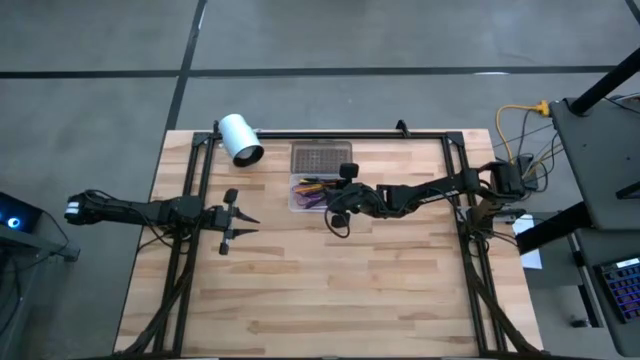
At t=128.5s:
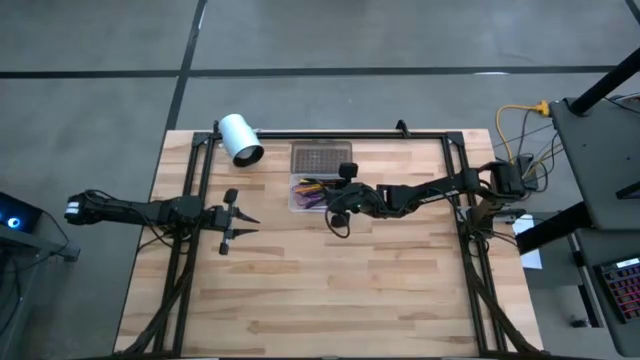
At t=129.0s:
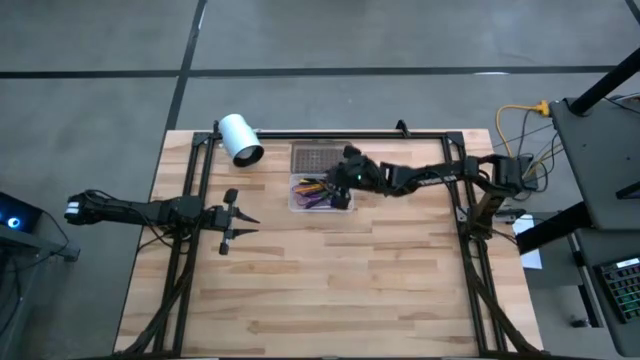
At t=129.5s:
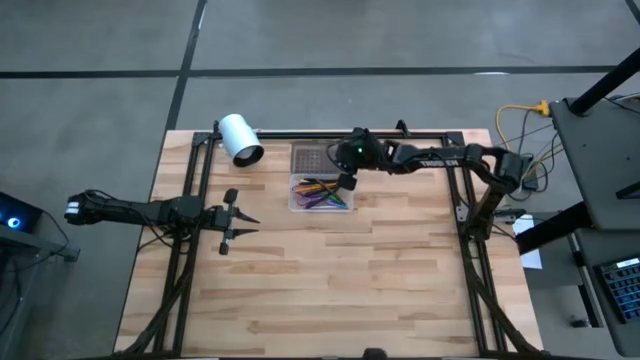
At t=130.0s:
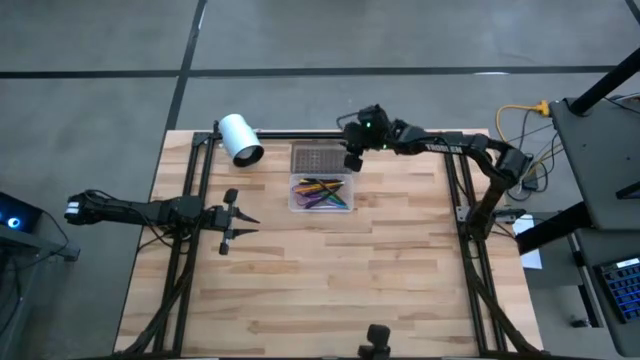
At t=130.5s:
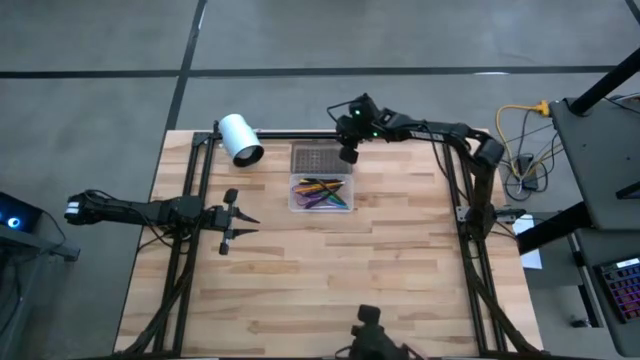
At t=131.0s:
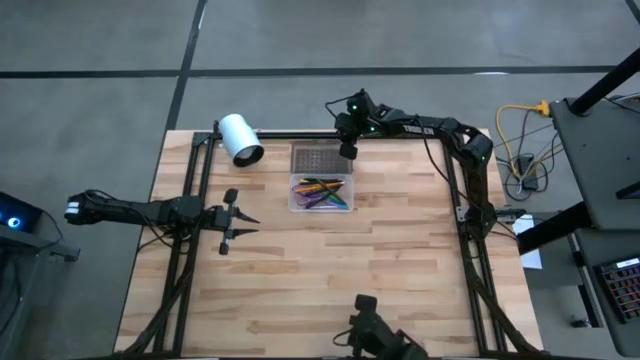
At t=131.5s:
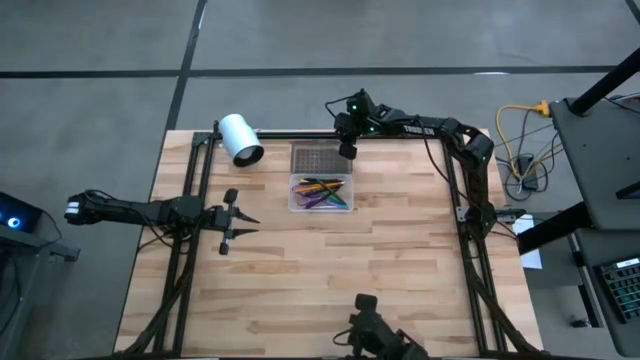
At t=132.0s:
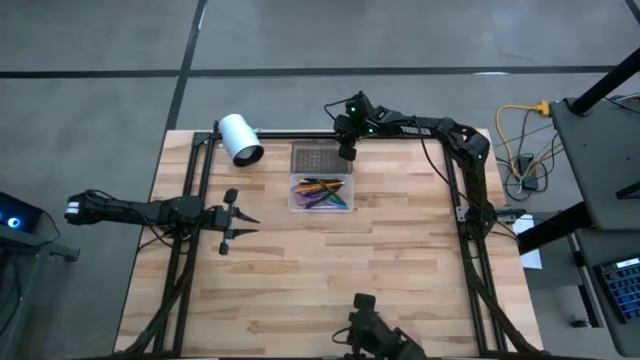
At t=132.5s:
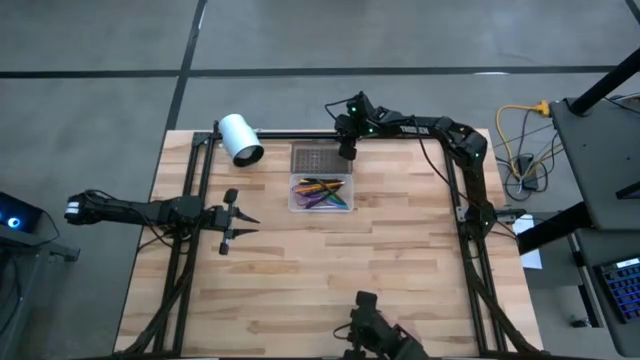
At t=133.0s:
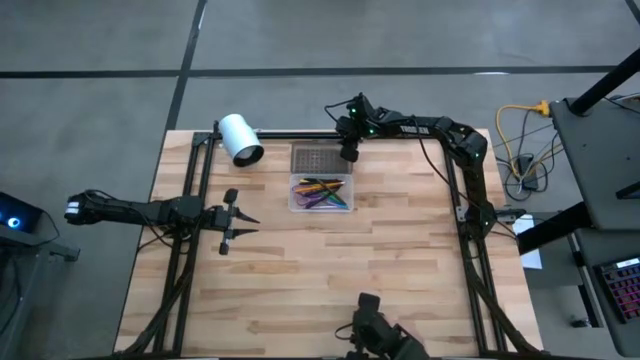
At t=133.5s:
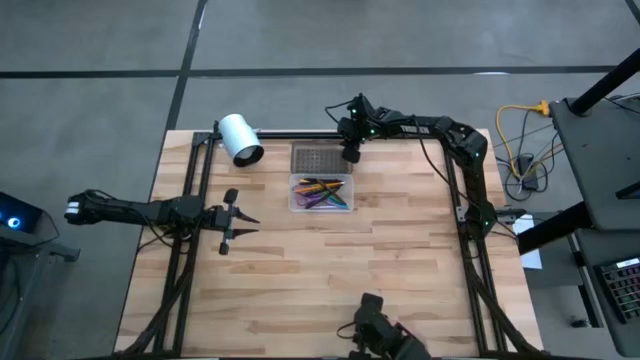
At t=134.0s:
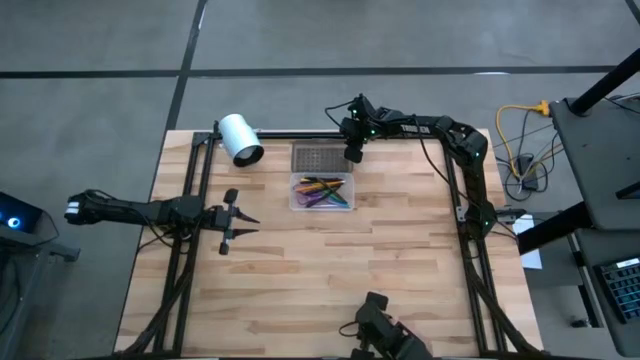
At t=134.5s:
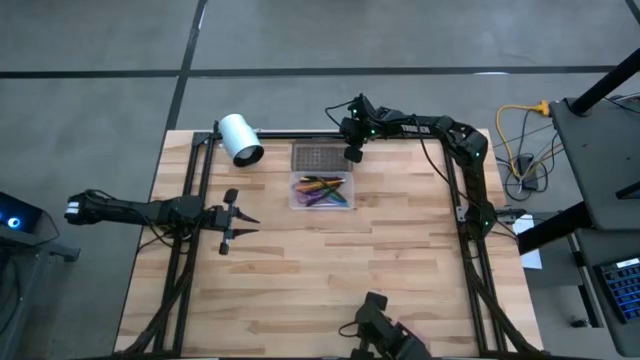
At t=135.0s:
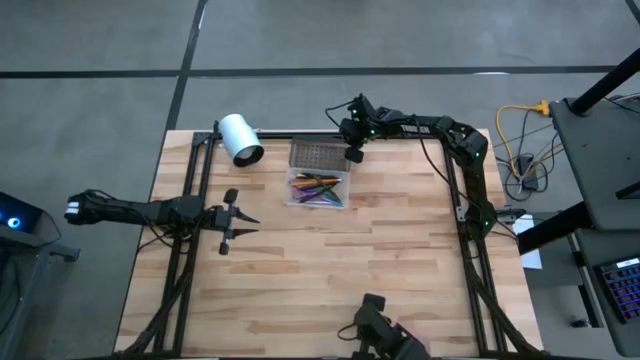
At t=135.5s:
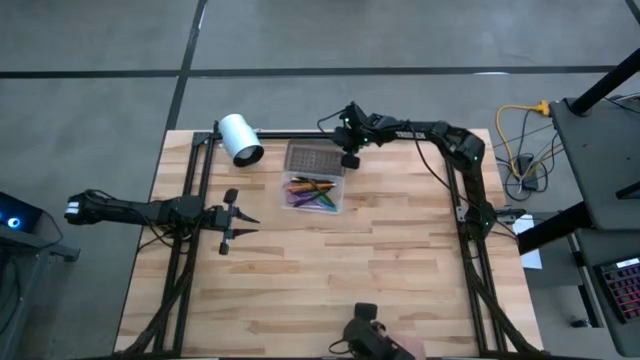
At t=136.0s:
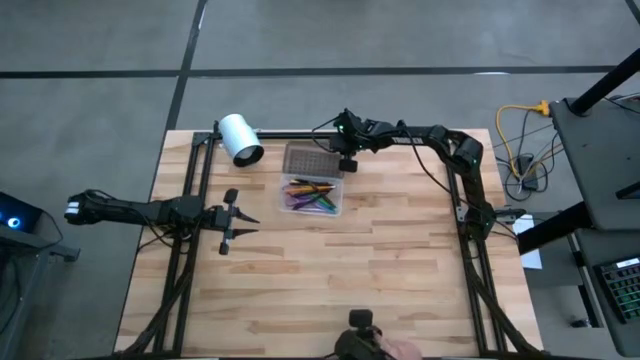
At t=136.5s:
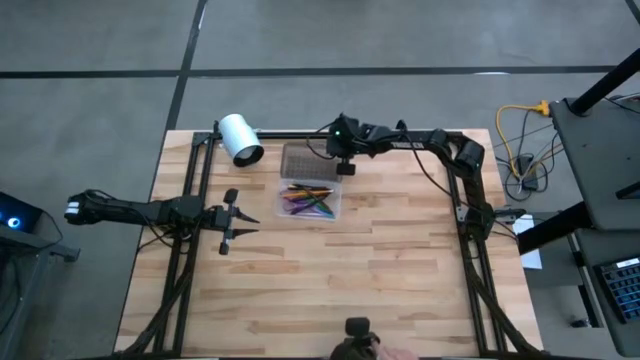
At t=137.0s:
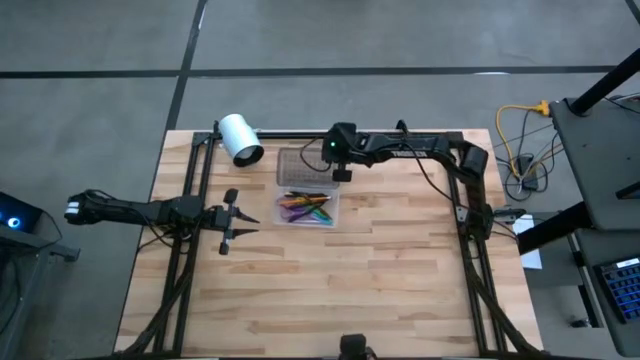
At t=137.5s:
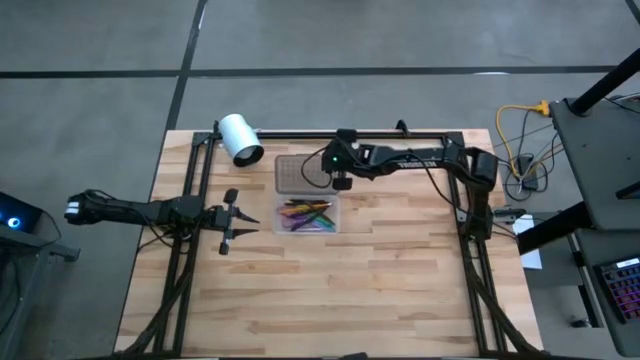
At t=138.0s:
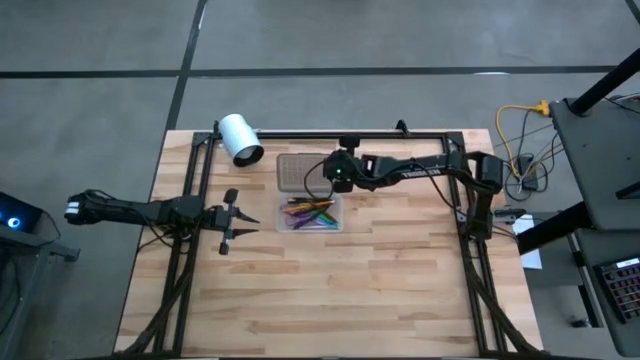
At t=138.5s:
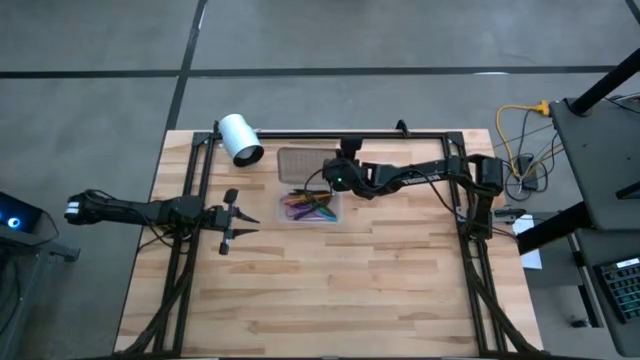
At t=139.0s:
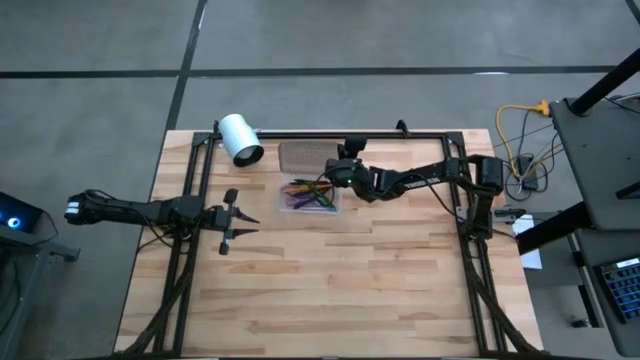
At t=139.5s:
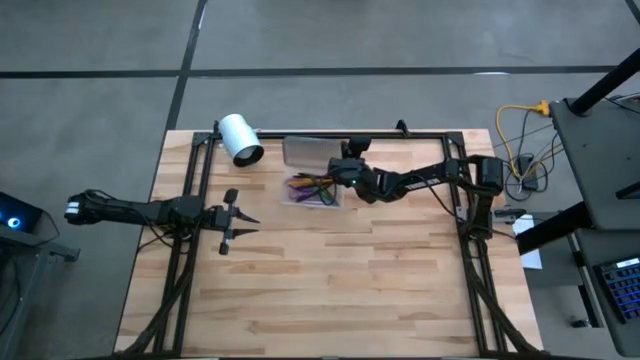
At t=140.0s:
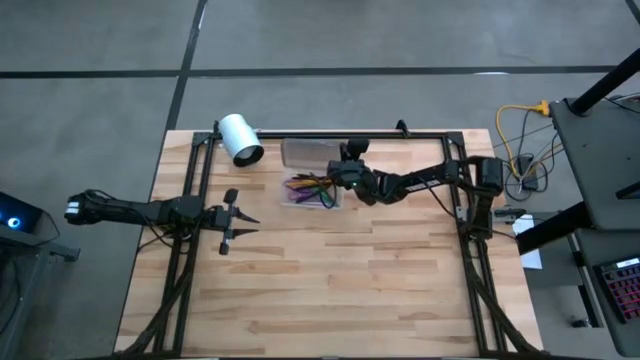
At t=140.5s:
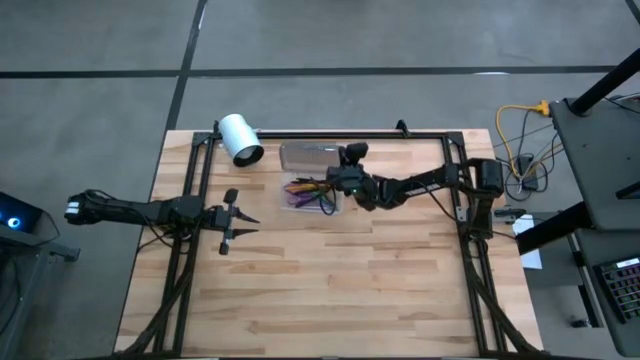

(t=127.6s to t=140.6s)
Task: Pick & place school supplies into a supply box
Close the supply box

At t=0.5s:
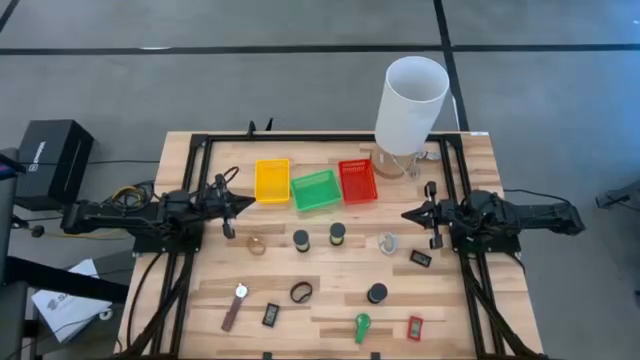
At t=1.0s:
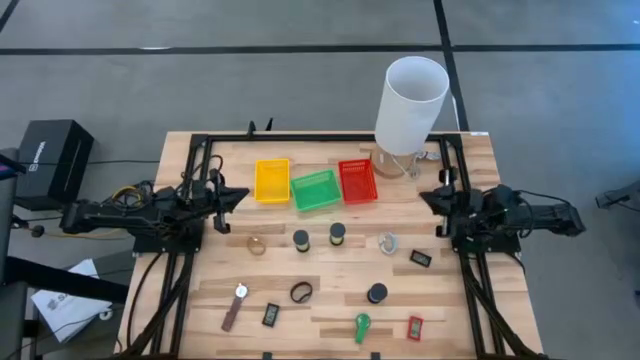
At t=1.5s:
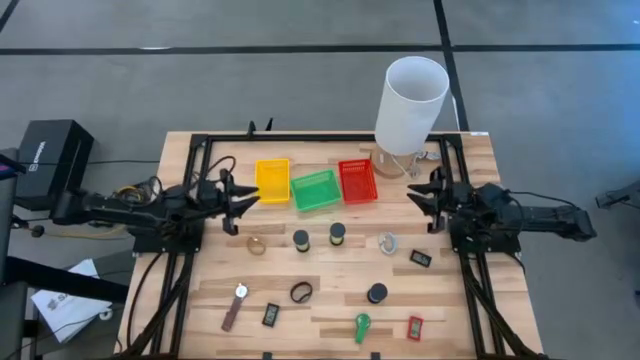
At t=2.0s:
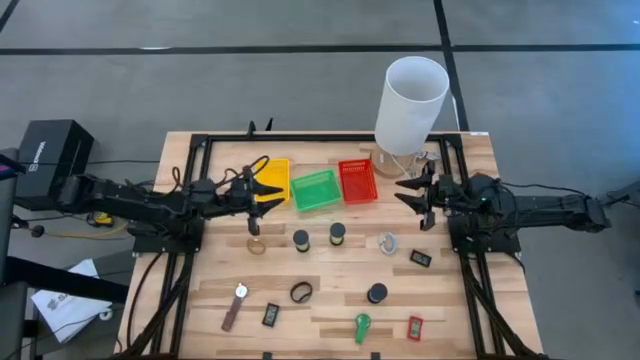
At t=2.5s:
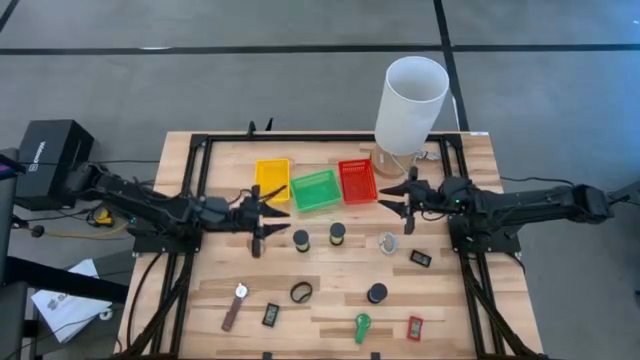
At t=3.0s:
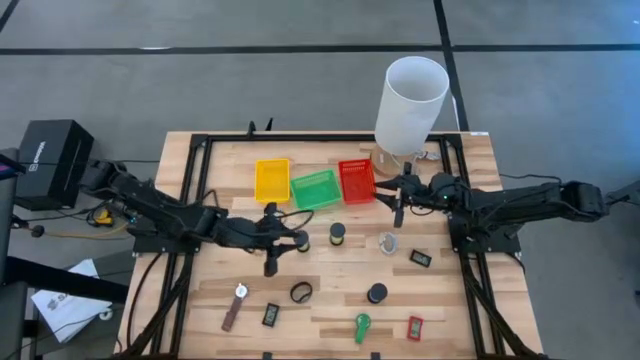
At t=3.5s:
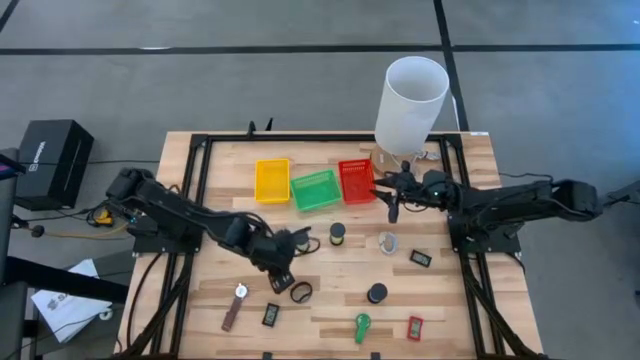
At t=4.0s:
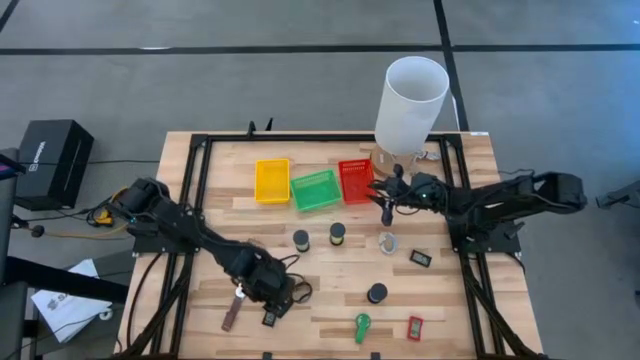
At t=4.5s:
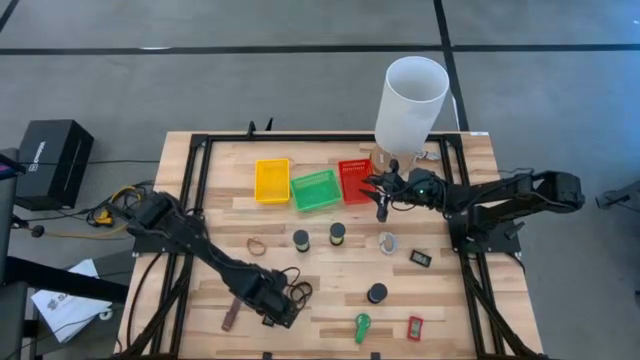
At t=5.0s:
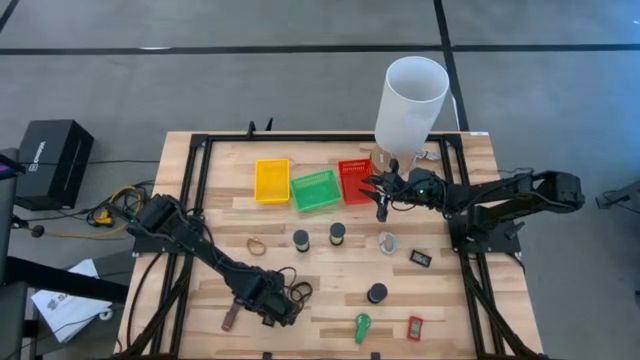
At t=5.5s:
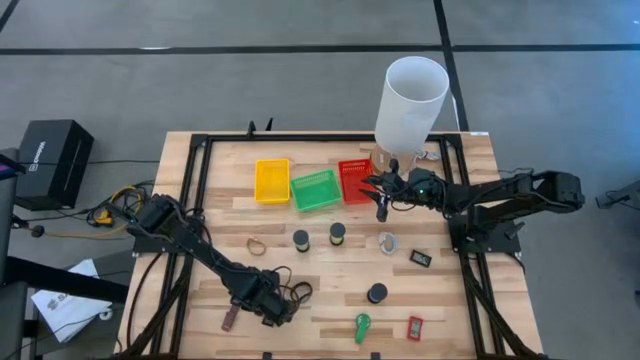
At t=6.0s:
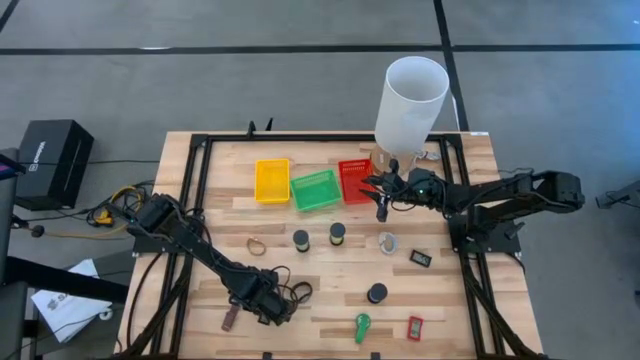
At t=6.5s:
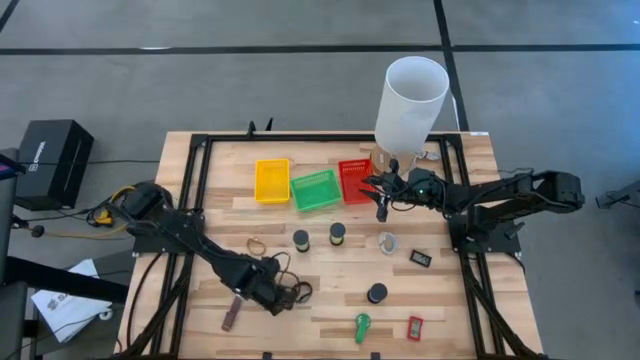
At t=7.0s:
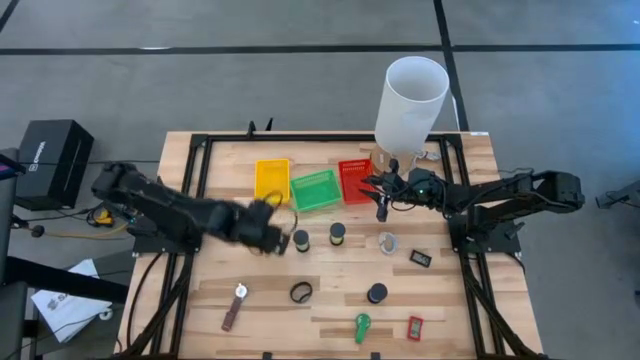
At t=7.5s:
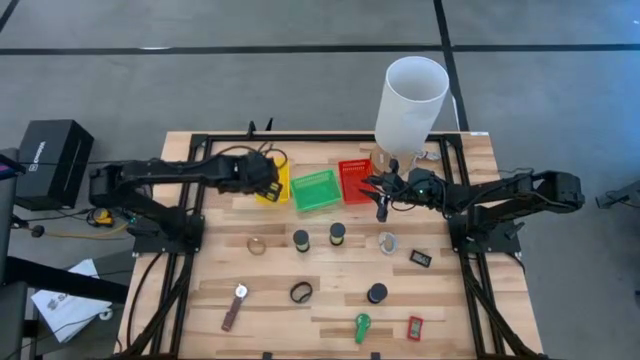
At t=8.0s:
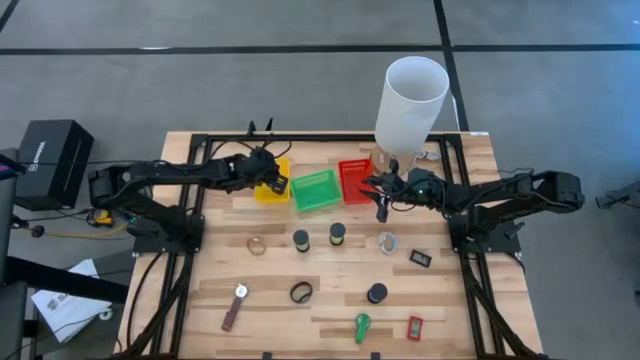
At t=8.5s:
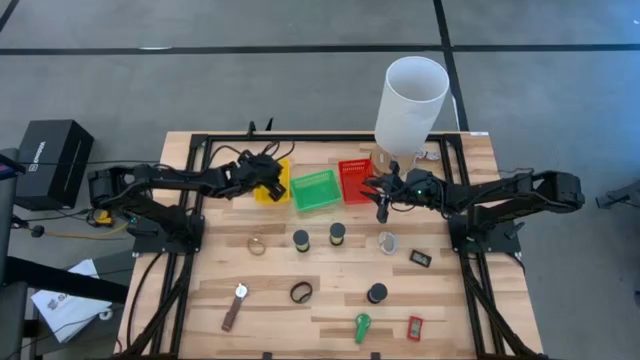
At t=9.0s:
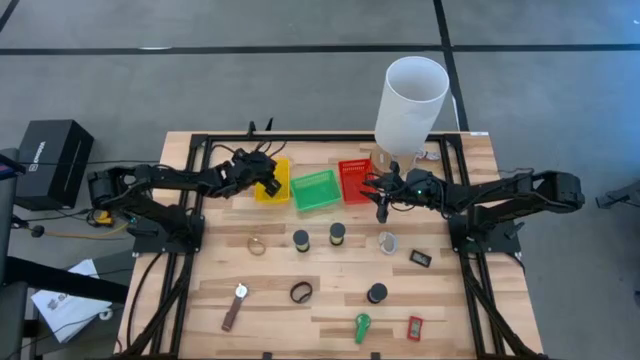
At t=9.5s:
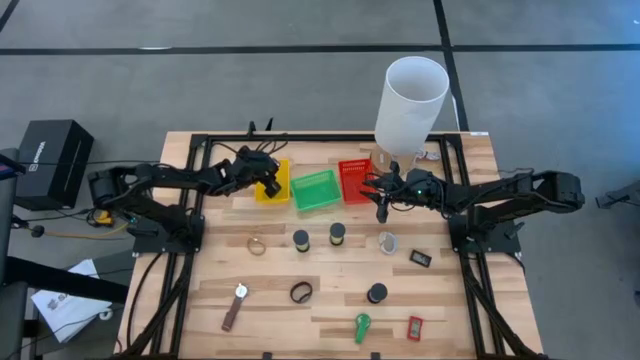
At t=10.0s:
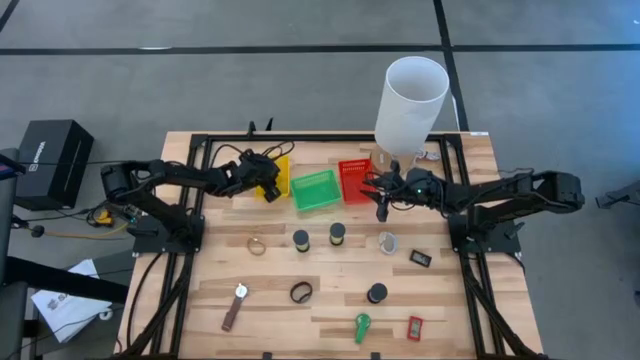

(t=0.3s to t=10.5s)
Task: Pick & Place Office items
Put the bottom black digital clock into the yellow basket
